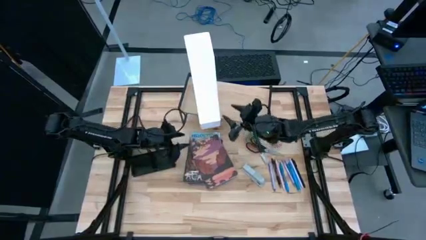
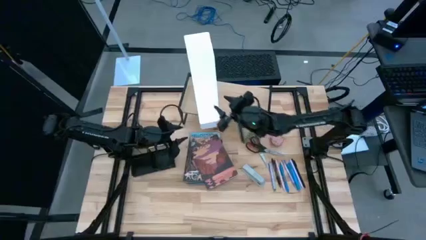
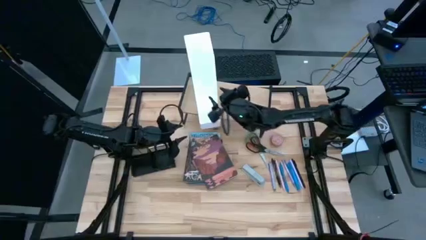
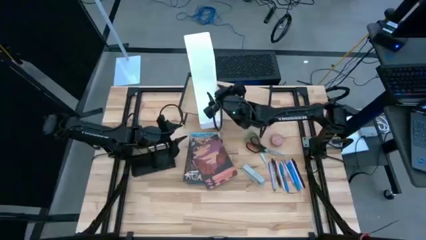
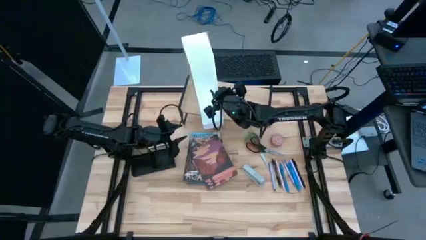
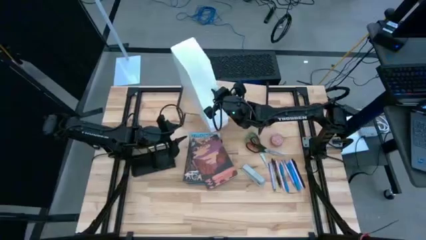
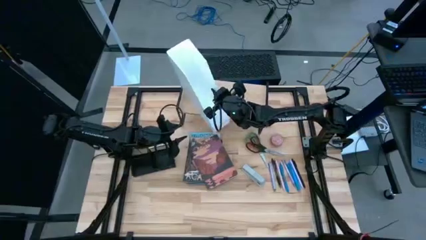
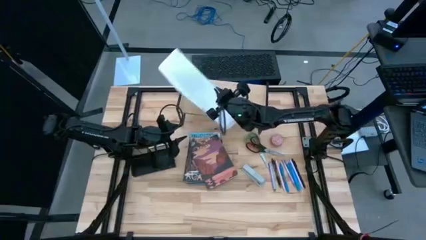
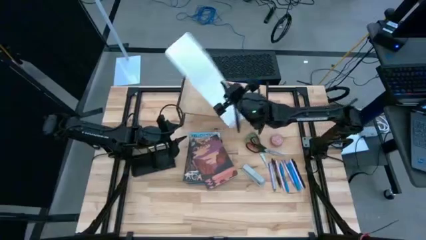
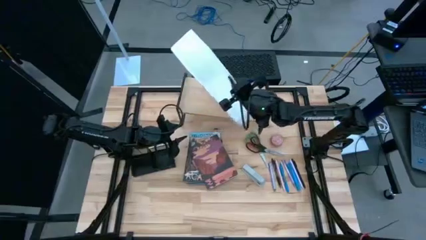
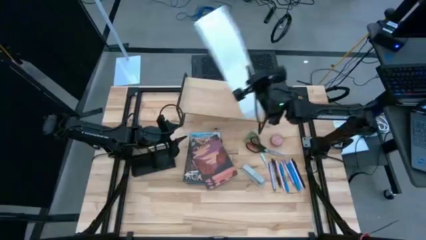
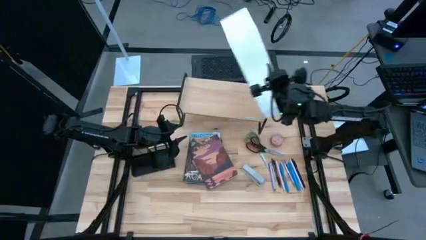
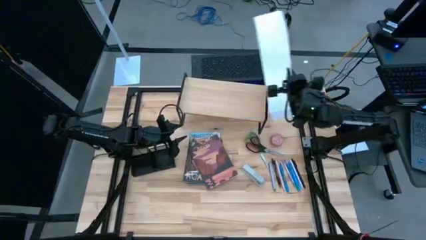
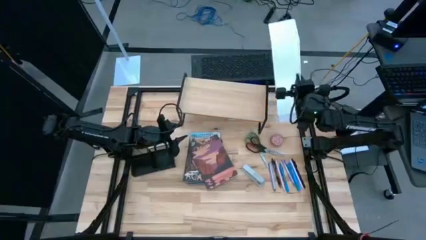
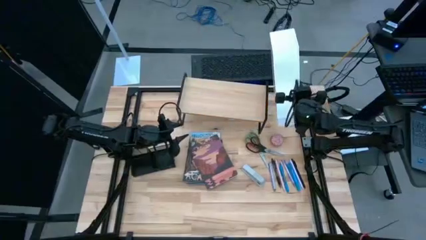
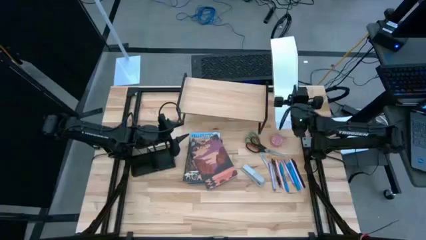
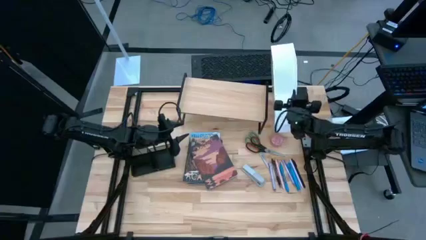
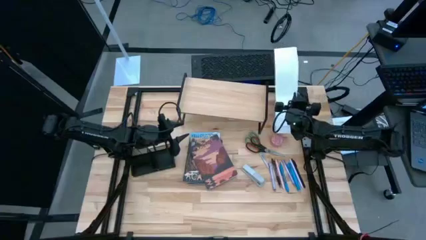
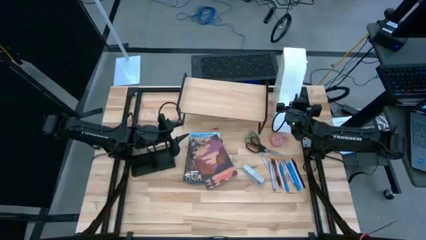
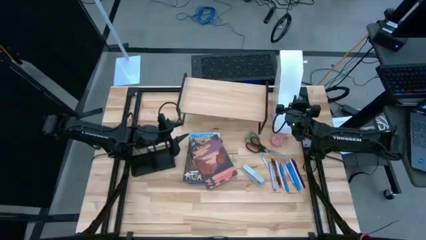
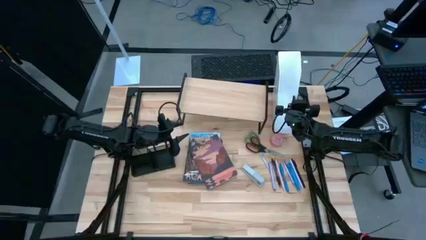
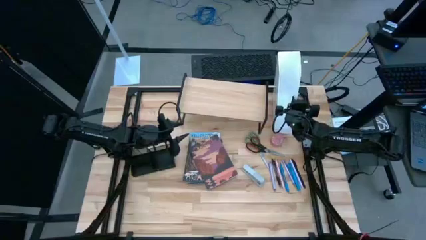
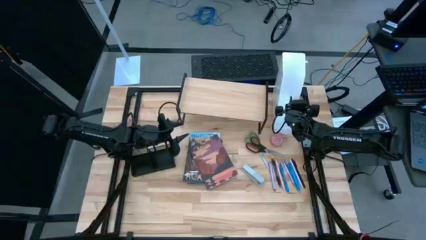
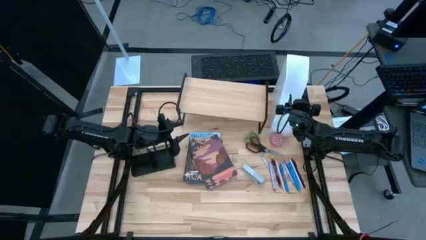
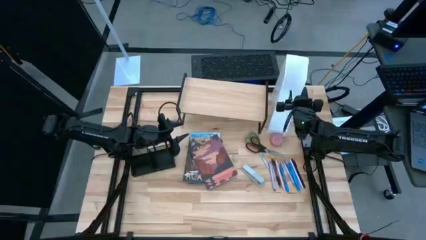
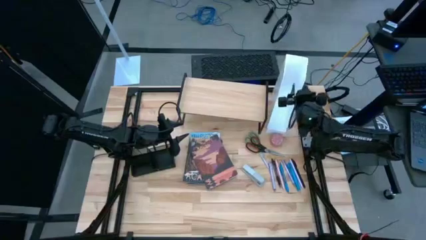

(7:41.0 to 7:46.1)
Task: Stock shelves
Remove the white bookshelf from the shelf to the top right of the table

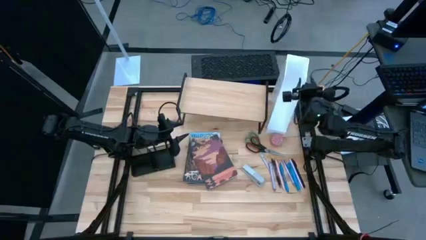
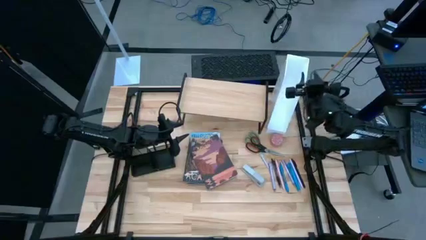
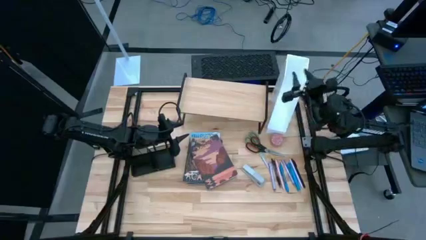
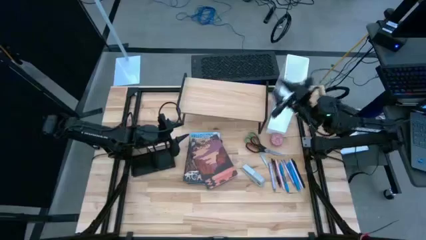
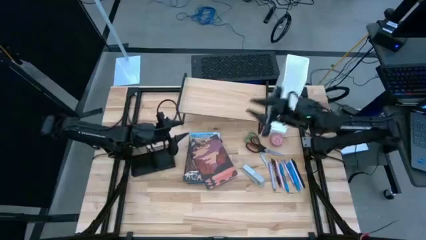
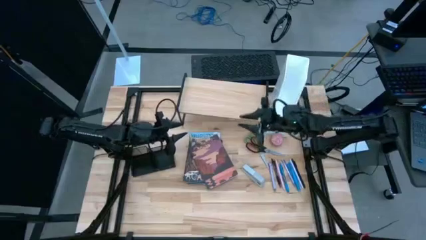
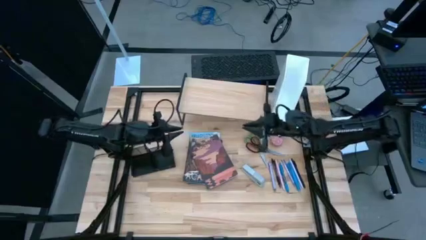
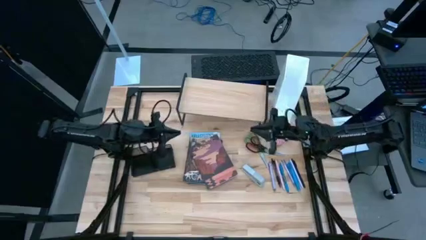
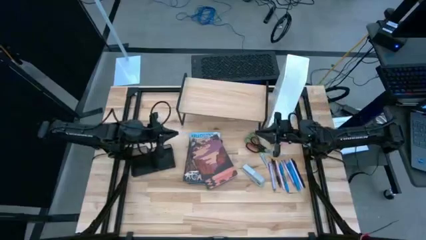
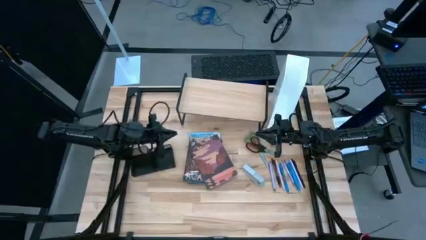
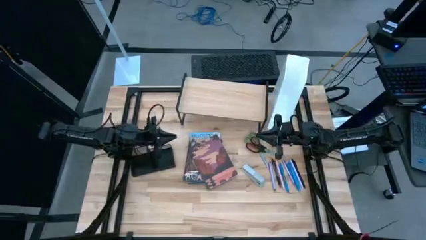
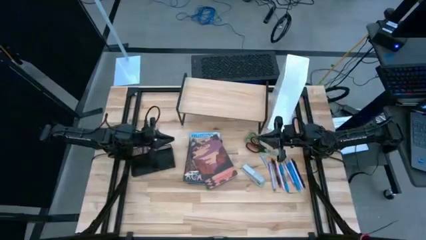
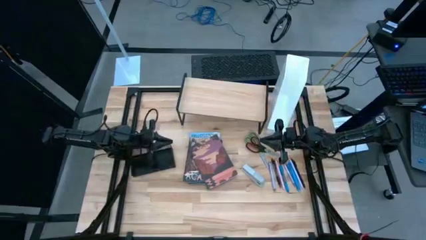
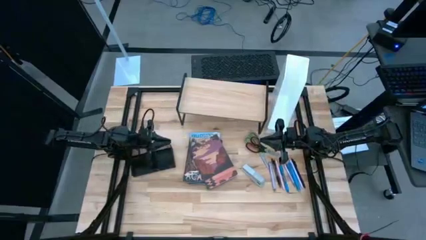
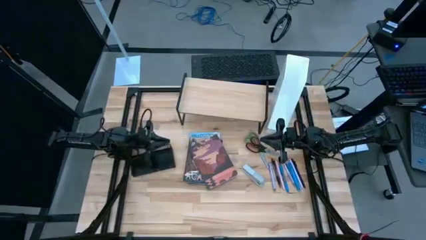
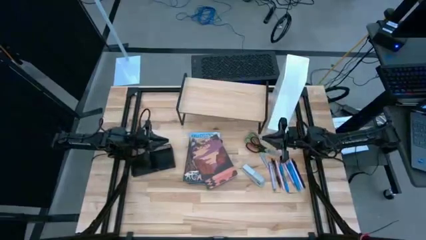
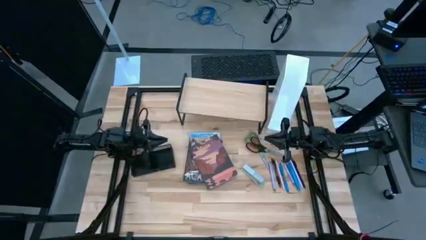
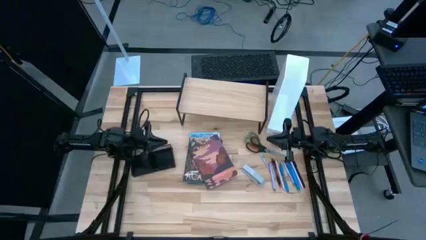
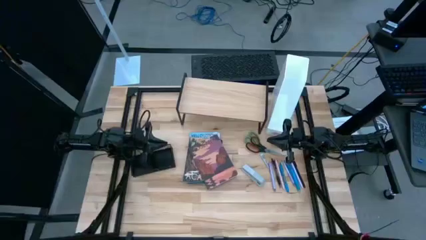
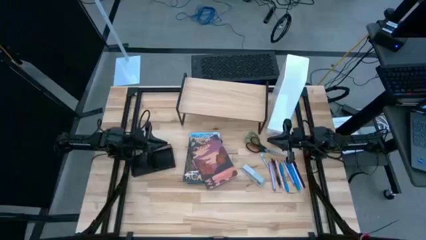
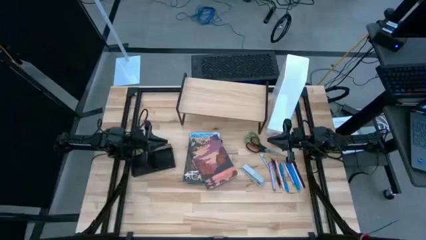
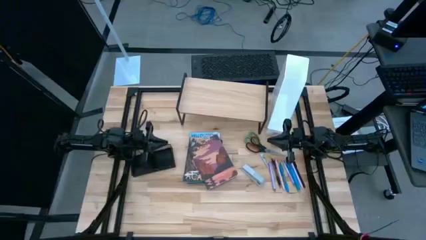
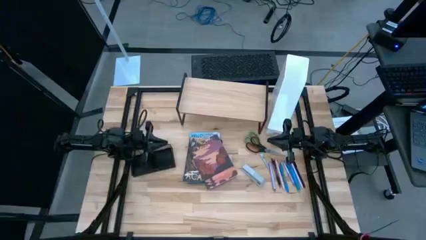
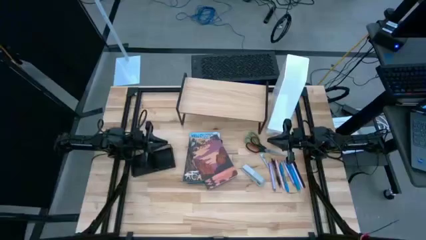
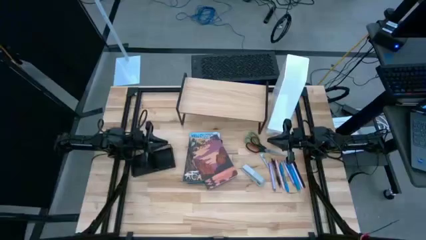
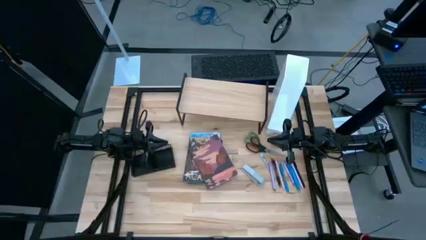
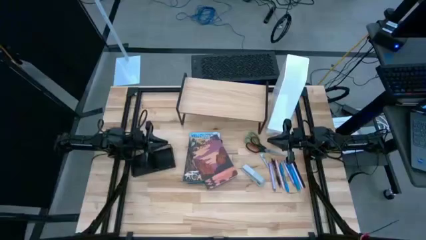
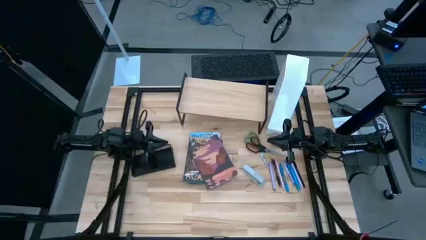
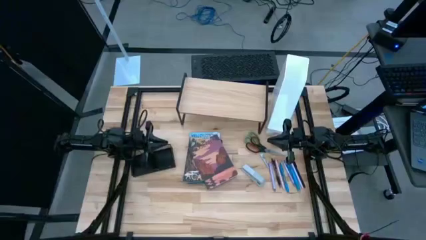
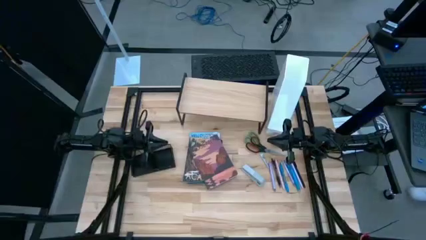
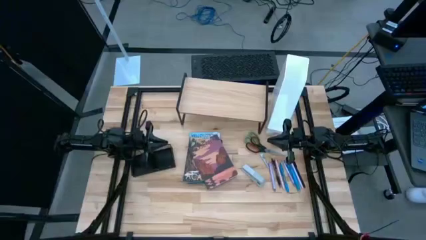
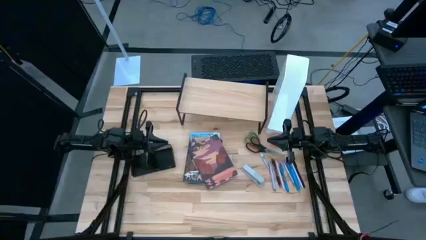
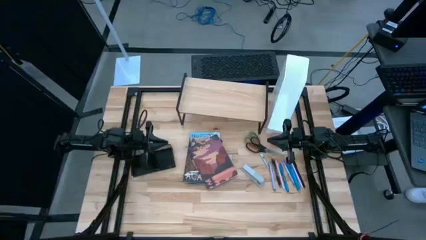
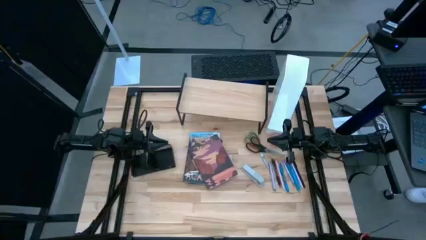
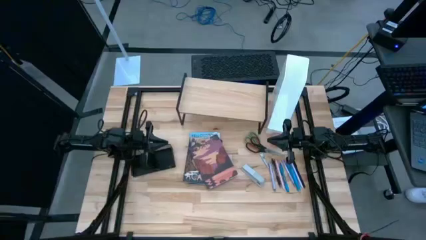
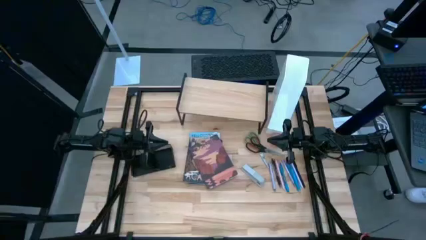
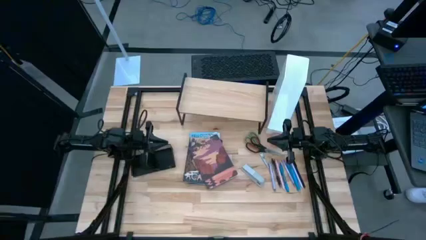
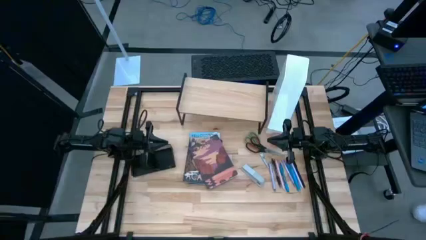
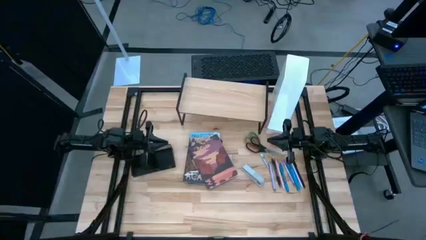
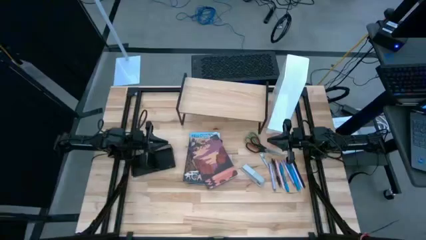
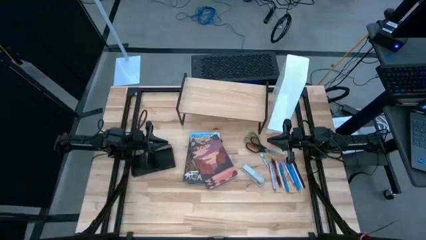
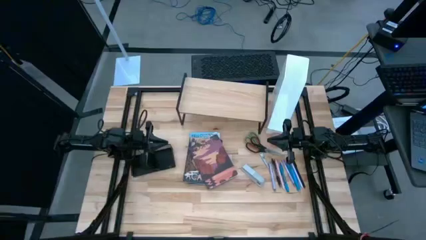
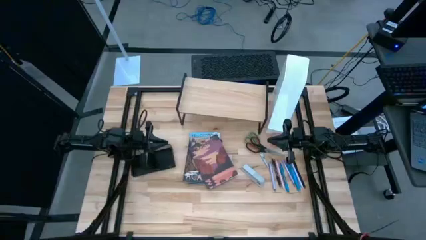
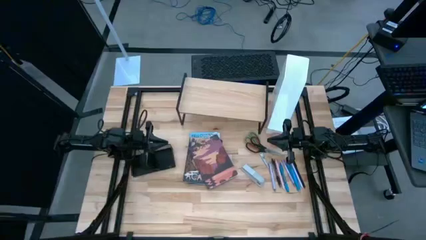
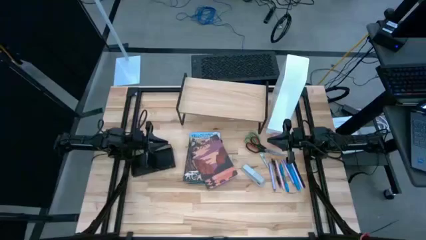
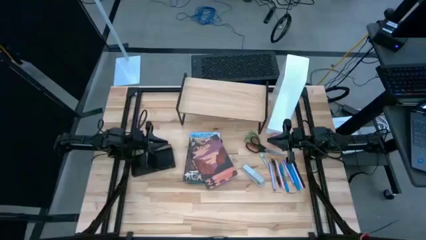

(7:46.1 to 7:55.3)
Return to Home Position
